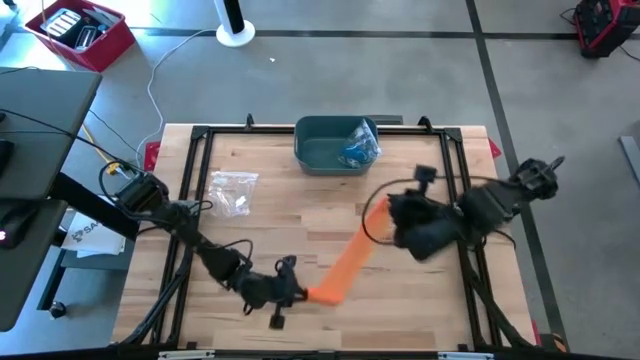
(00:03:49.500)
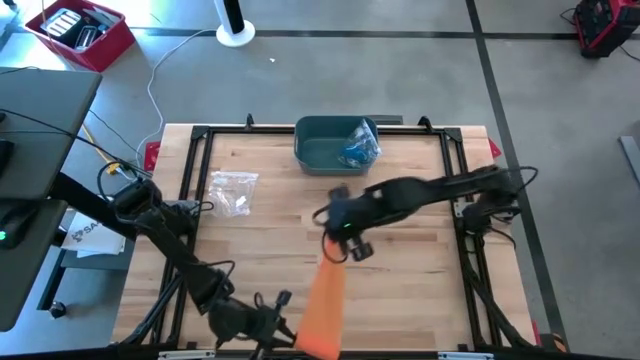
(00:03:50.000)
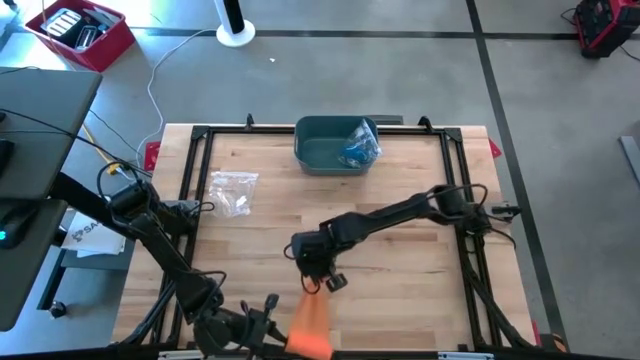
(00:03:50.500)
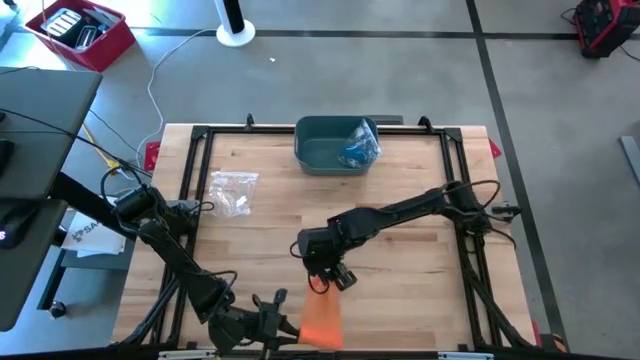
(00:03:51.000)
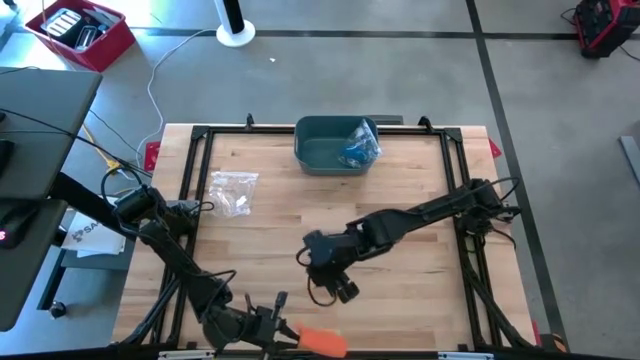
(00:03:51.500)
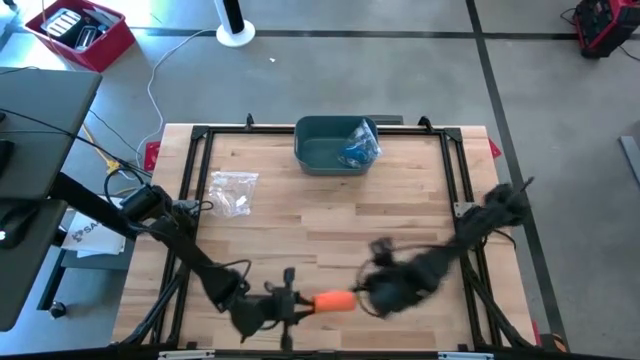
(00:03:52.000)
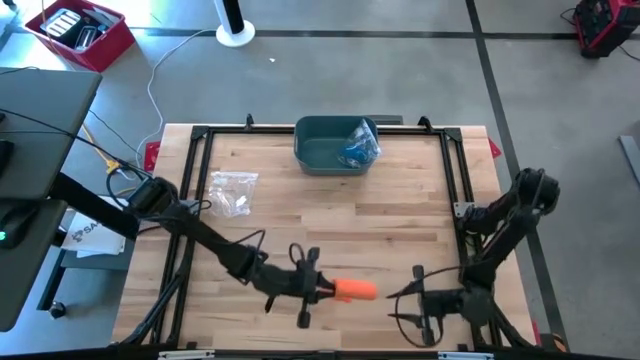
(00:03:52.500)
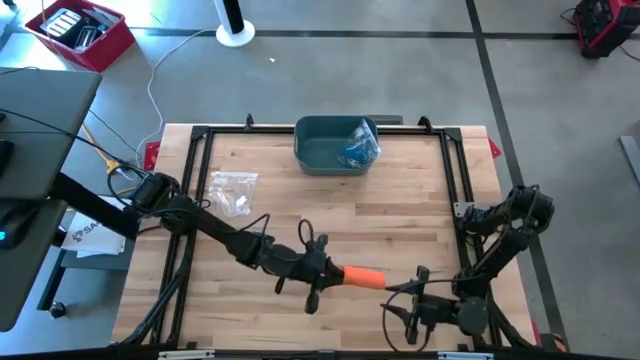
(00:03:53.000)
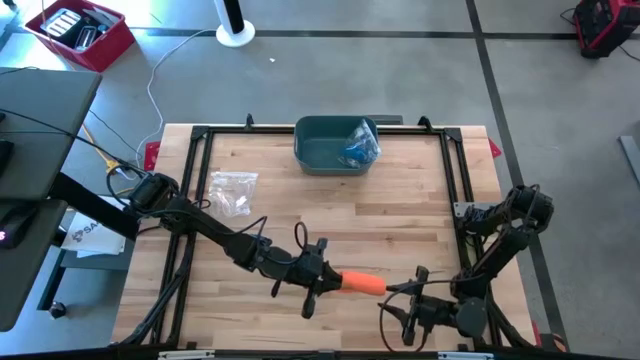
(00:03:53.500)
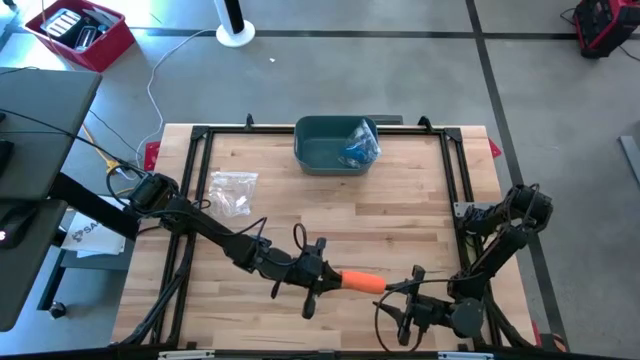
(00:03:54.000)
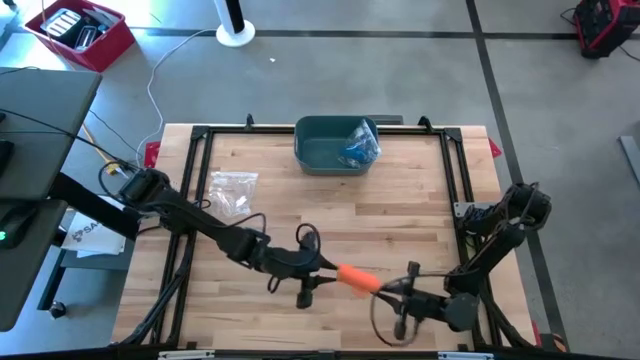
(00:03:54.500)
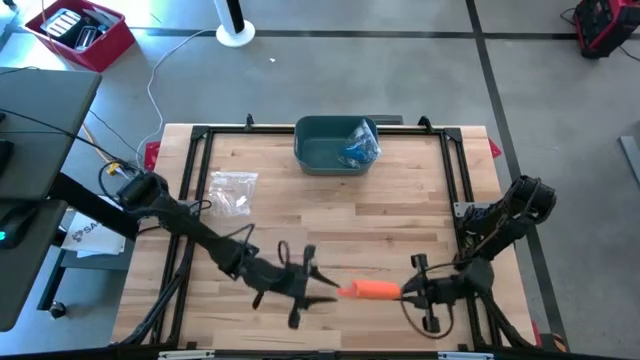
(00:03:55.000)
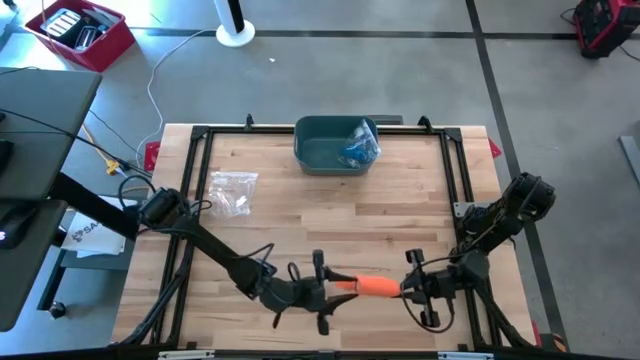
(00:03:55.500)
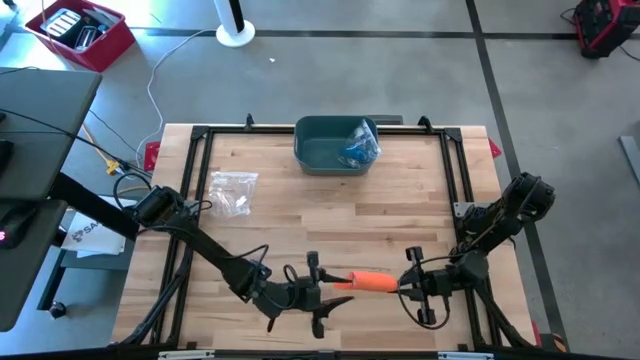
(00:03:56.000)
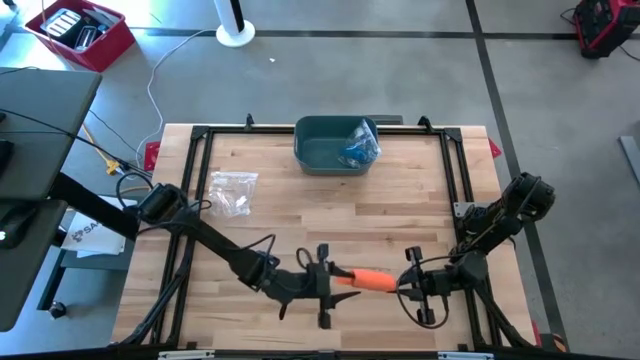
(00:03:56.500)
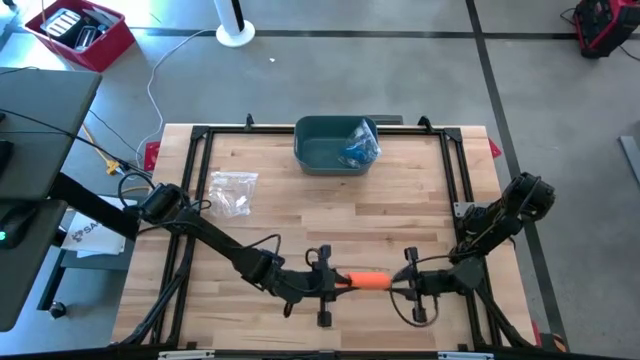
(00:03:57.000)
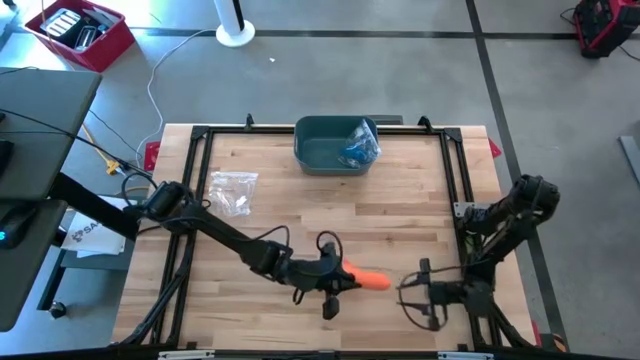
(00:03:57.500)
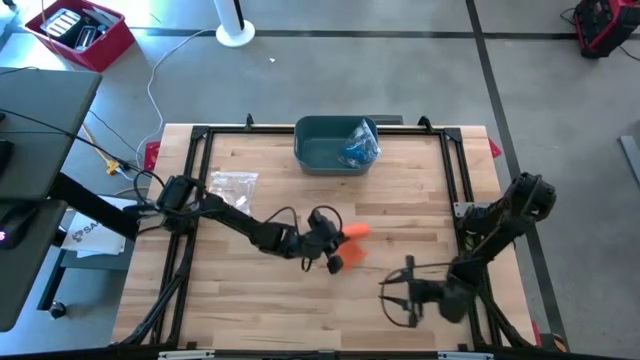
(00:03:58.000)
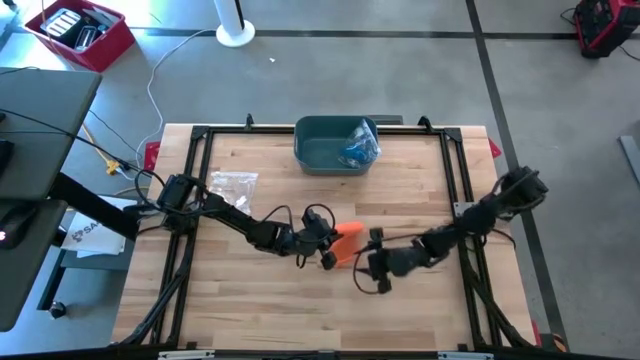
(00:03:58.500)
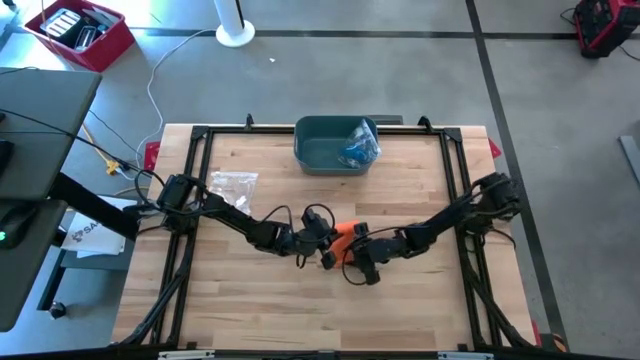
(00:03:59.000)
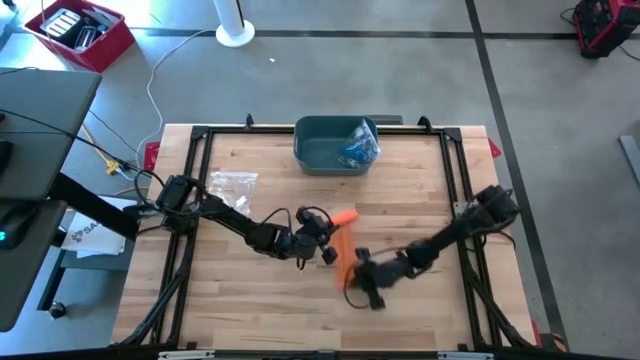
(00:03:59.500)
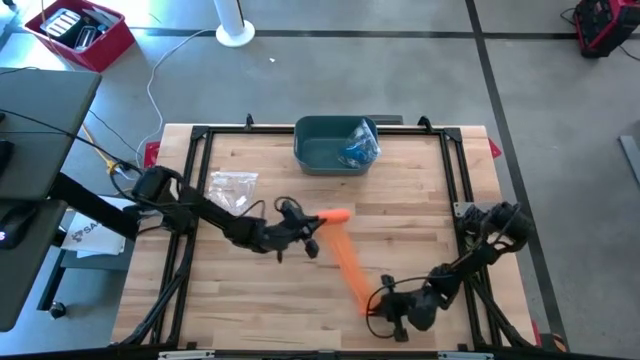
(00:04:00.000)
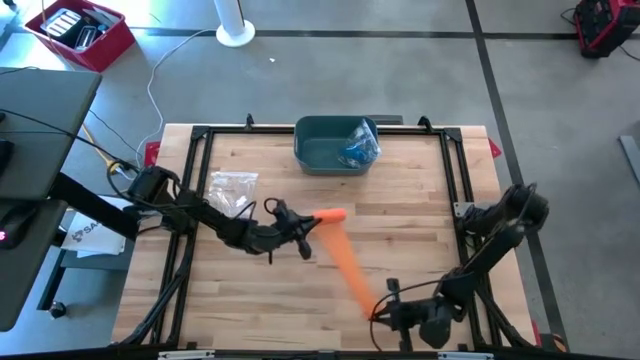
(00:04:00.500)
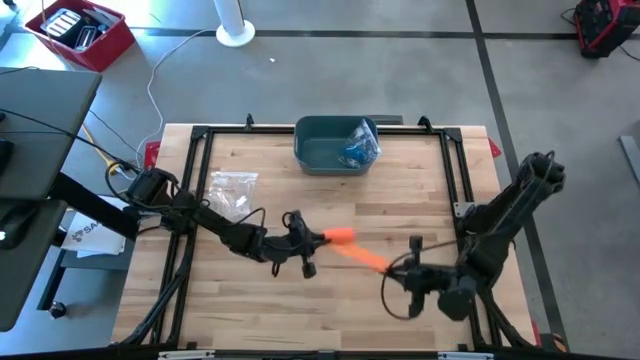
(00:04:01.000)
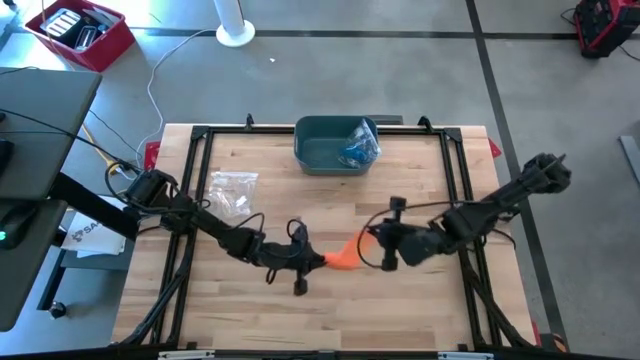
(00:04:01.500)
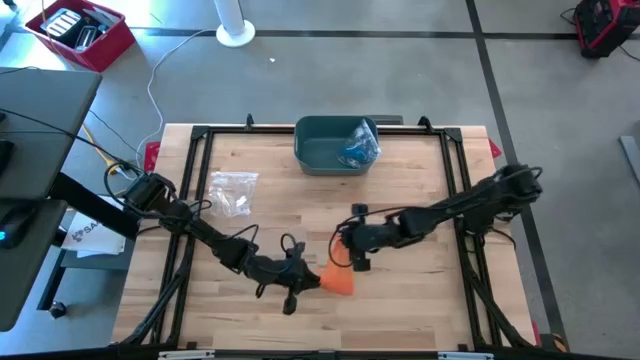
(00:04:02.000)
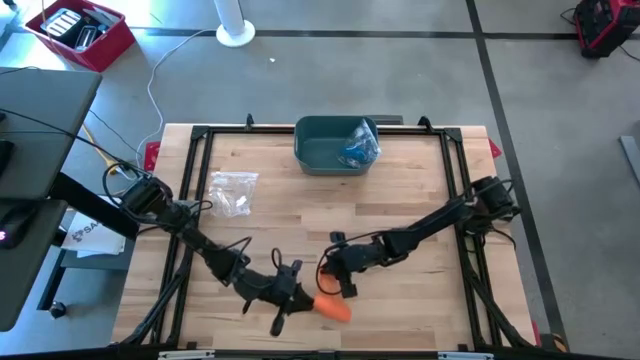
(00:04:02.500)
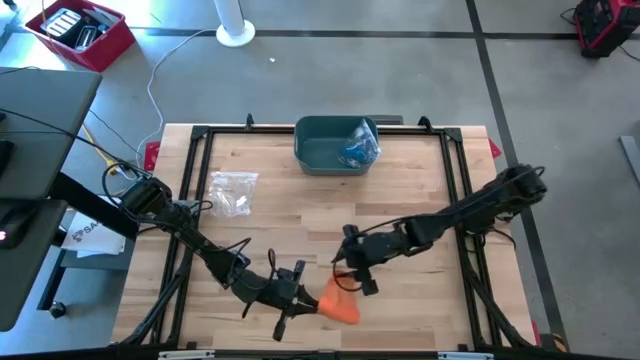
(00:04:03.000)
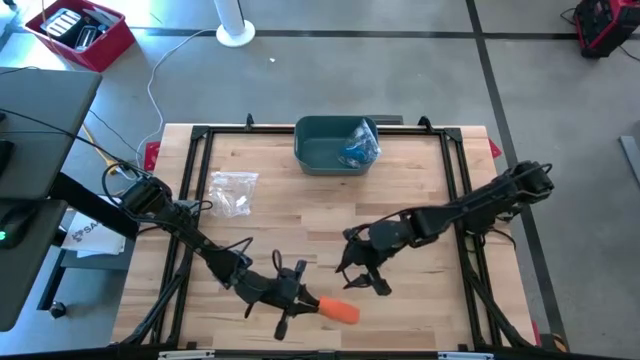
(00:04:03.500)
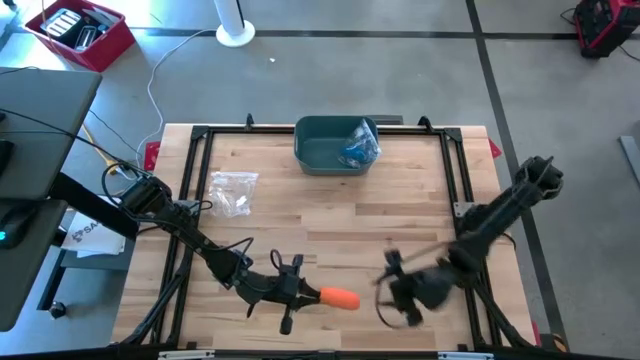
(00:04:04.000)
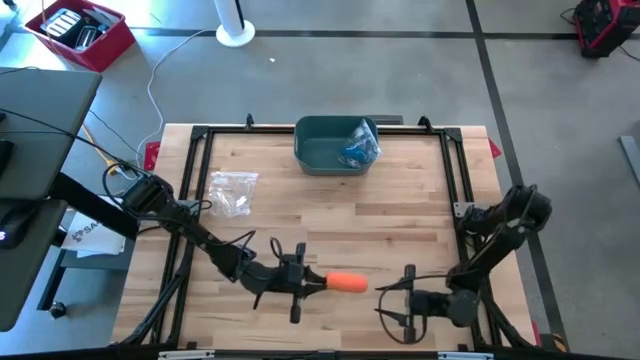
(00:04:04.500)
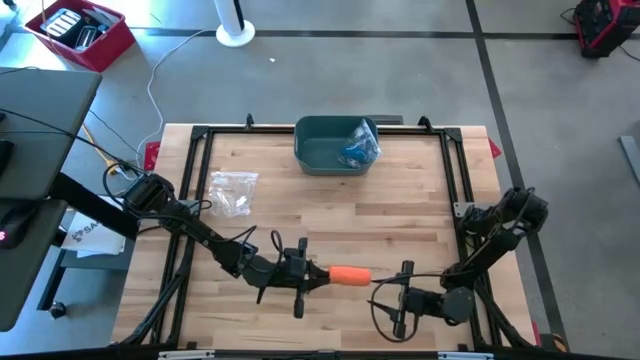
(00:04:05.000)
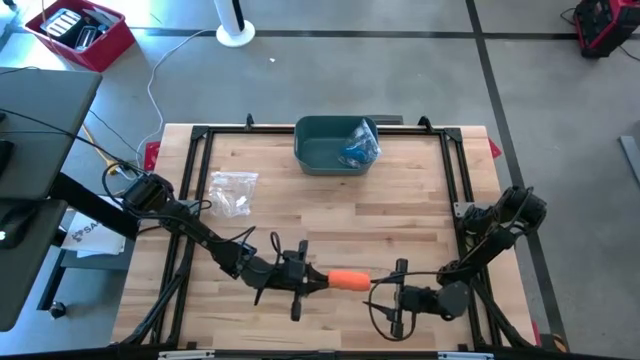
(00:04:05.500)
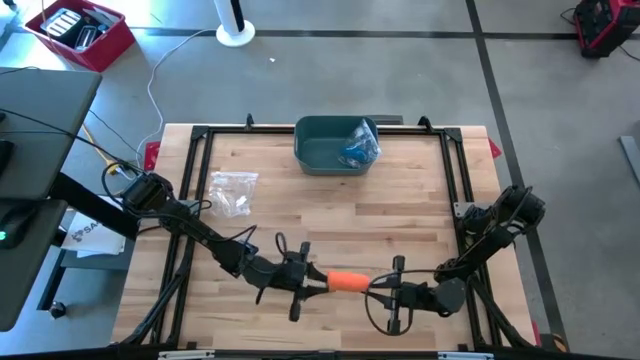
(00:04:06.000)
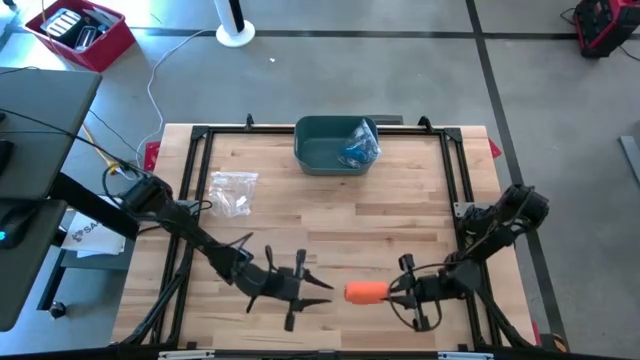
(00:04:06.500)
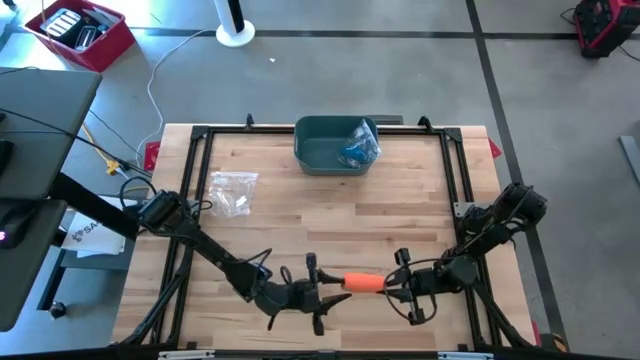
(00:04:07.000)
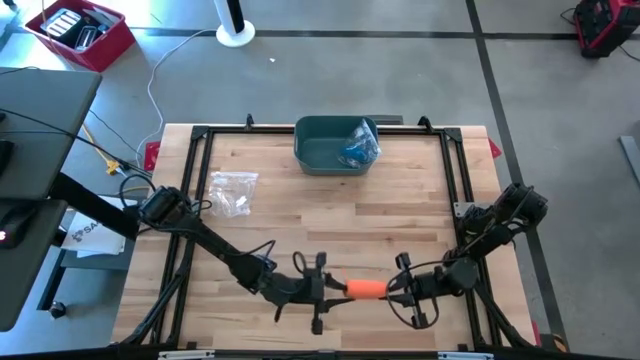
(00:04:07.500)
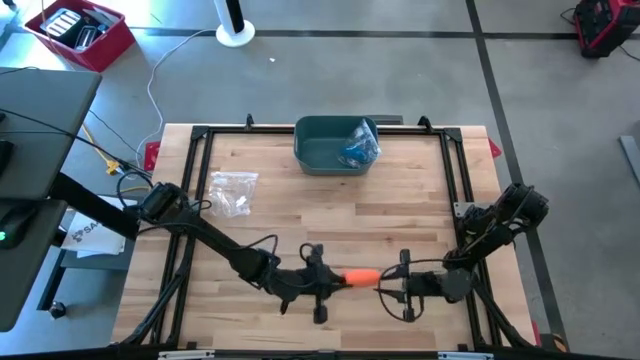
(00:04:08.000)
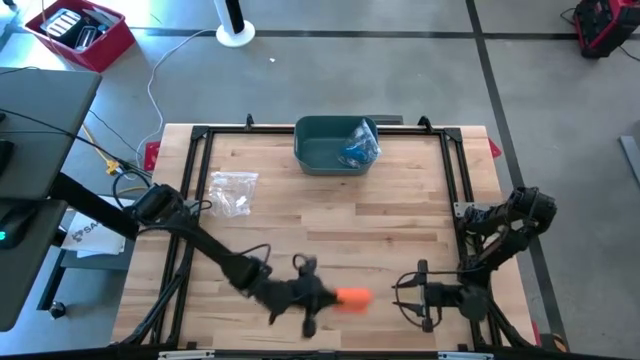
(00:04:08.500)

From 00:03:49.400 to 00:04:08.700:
Task: Roll bandage
Roll the orange bandage
